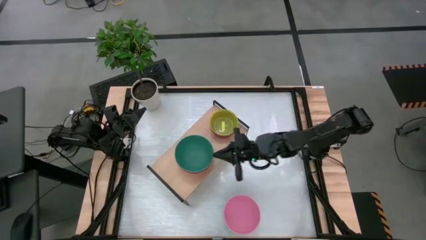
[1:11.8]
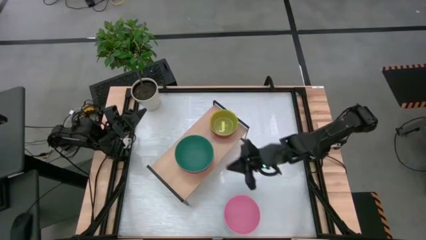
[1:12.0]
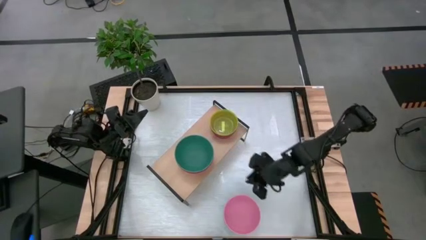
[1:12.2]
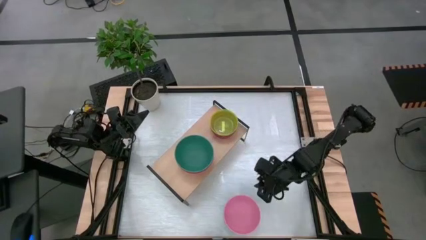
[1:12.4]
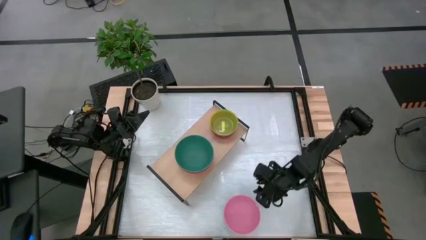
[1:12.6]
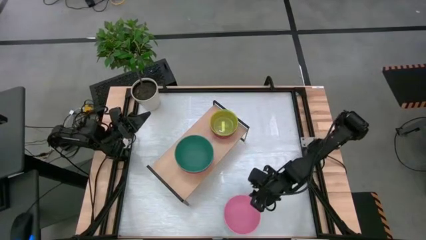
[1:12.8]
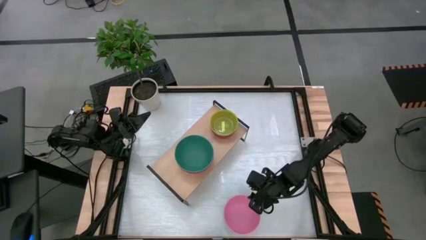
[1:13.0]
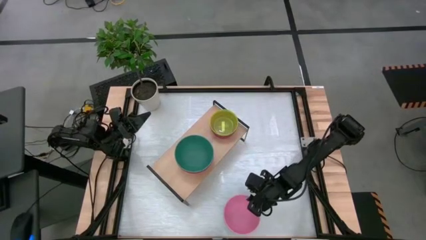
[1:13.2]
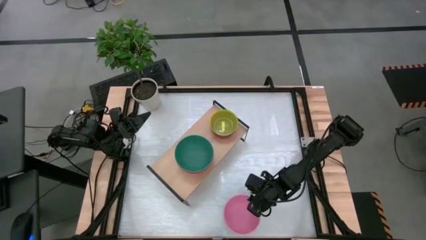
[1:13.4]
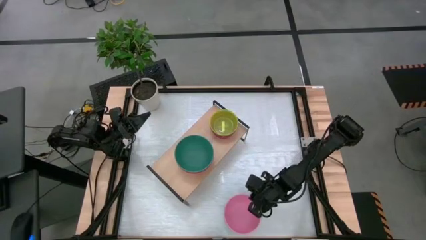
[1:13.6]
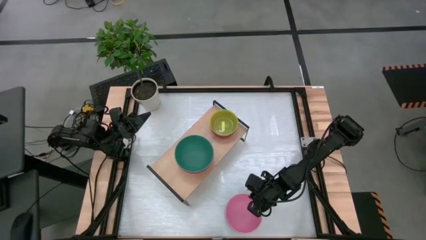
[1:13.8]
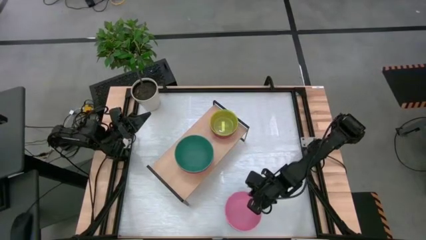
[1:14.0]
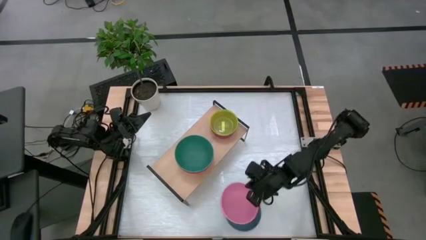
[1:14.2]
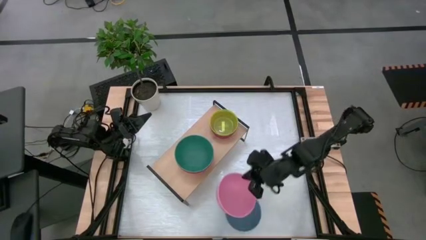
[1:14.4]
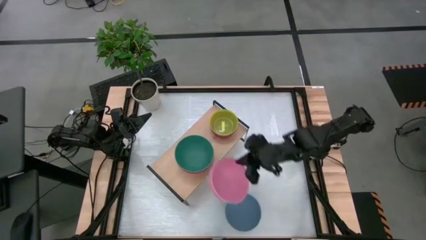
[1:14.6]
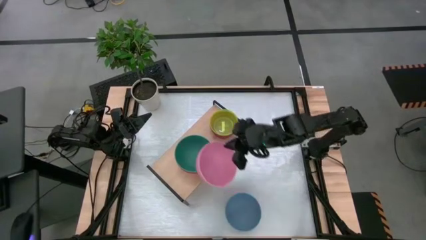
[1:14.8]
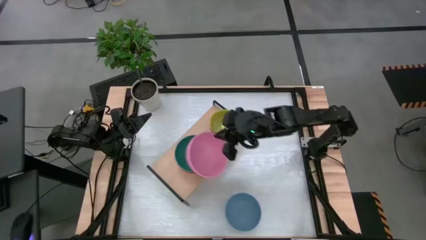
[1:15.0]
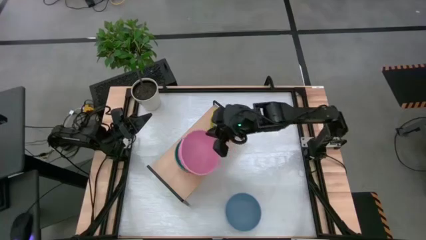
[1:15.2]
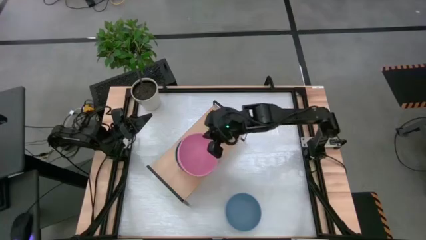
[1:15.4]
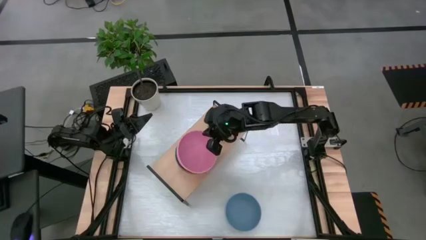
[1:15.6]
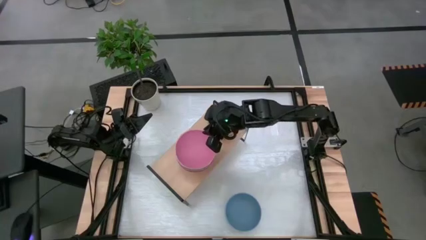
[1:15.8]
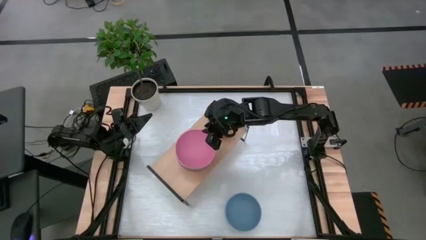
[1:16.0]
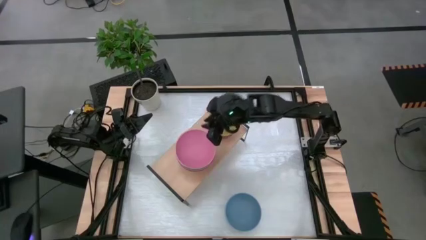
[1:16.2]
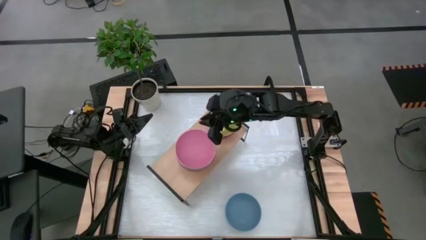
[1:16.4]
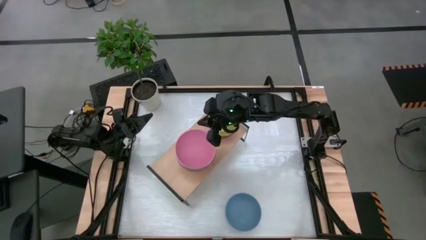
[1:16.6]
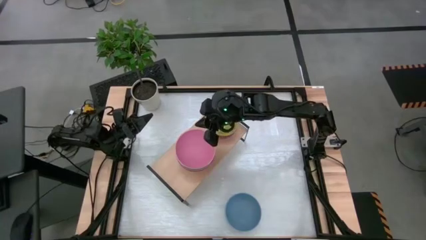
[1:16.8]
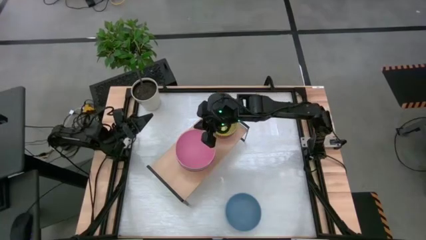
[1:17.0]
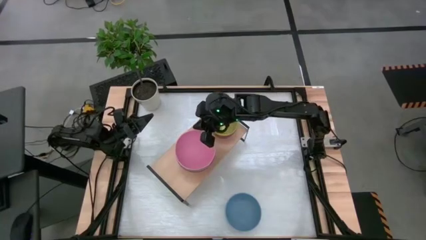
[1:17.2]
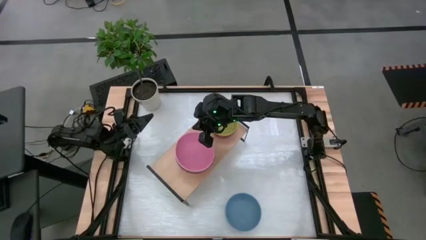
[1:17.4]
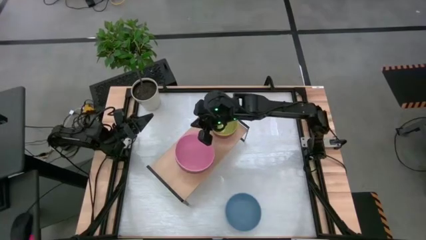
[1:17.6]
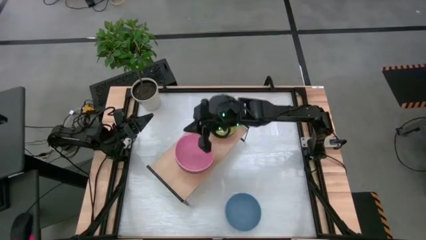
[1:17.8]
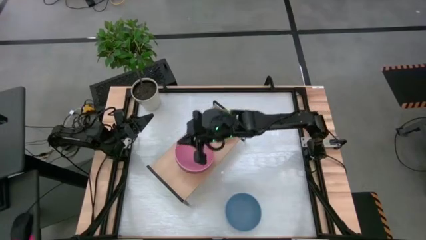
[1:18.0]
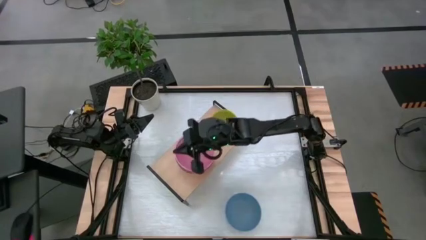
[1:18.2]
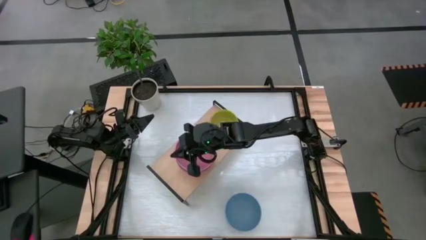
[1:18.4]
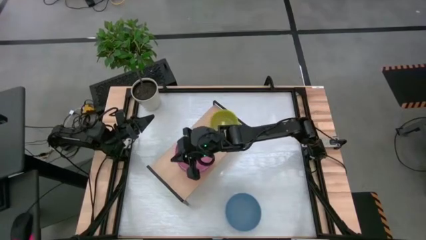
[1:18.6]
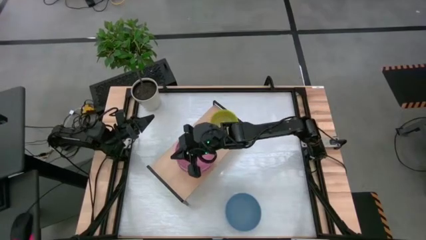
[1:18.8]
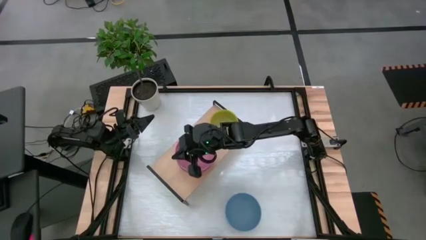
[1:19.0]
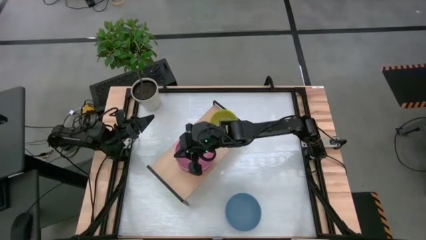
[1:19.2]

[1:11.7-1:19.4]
Task: Place and stack bowls onto a shelf
Stack the pink bowl on top of the green bowl into the shelf

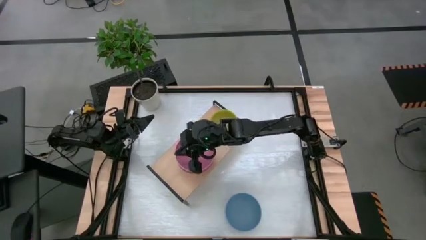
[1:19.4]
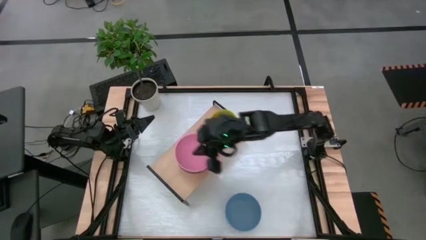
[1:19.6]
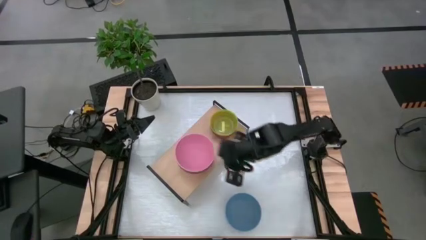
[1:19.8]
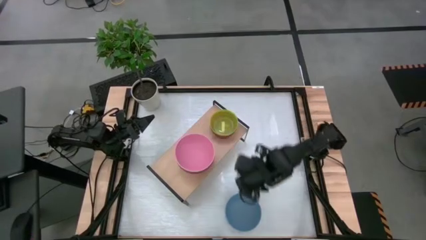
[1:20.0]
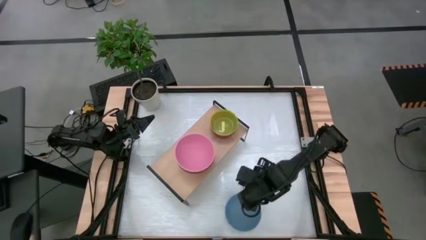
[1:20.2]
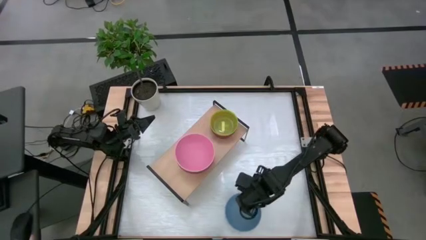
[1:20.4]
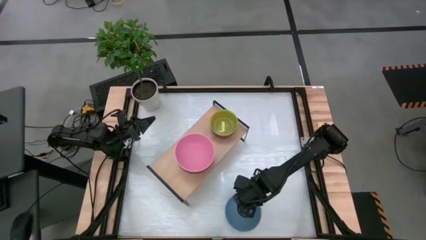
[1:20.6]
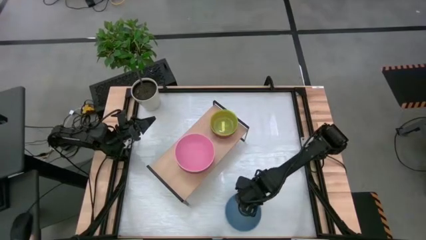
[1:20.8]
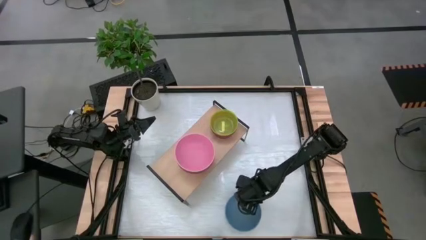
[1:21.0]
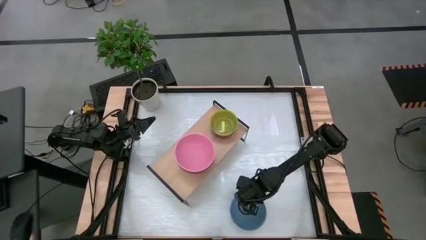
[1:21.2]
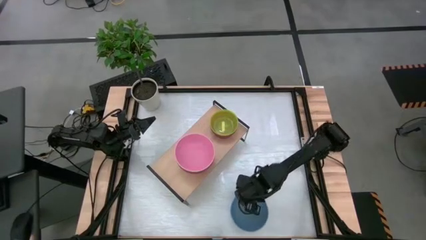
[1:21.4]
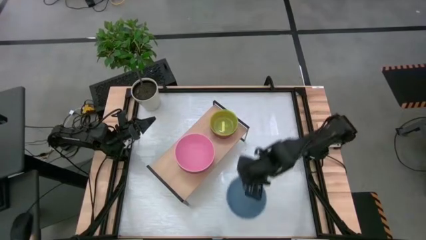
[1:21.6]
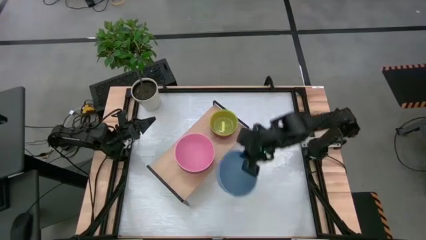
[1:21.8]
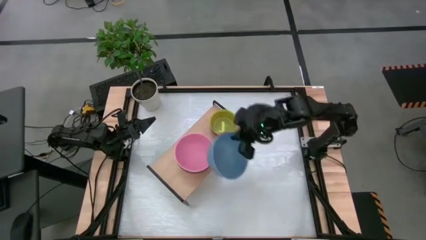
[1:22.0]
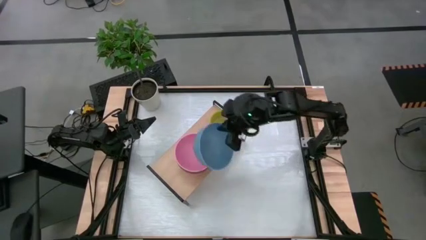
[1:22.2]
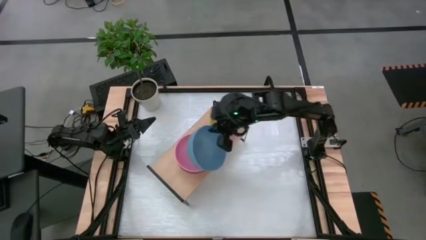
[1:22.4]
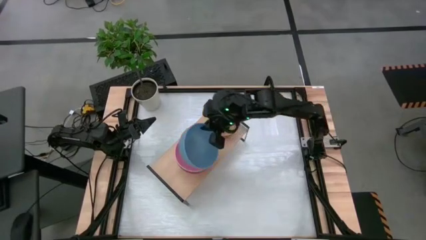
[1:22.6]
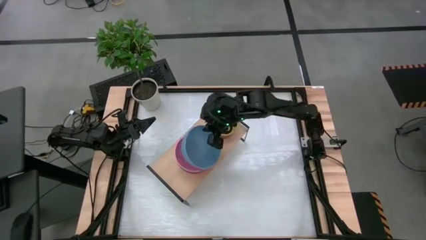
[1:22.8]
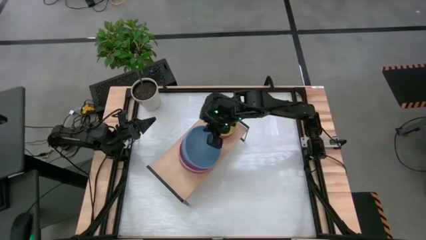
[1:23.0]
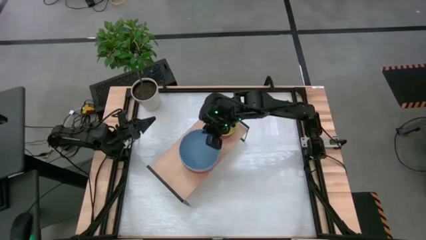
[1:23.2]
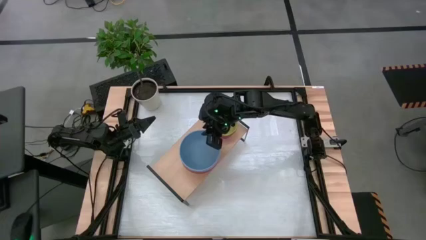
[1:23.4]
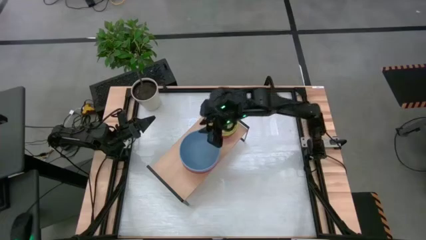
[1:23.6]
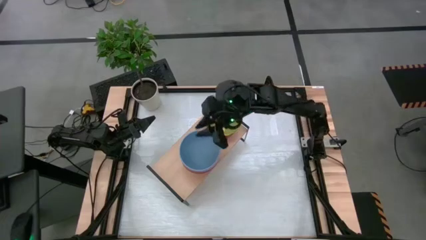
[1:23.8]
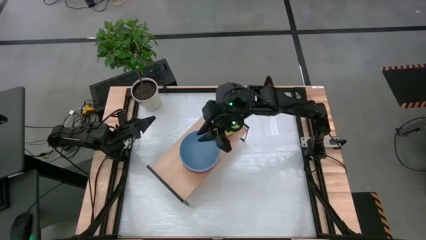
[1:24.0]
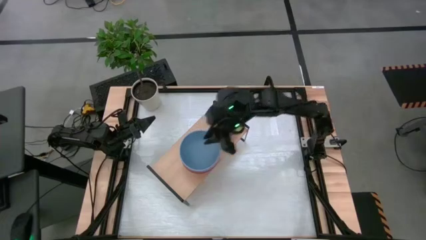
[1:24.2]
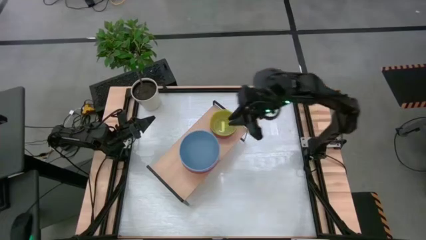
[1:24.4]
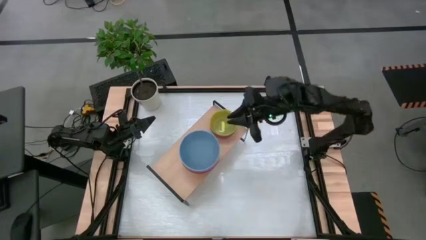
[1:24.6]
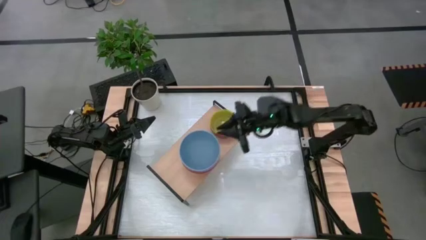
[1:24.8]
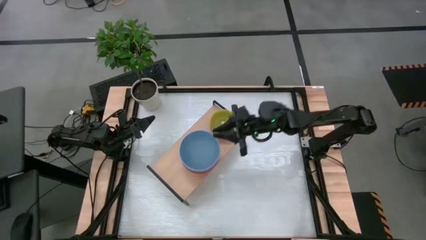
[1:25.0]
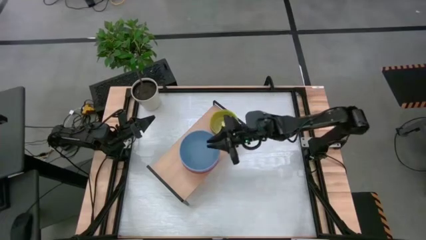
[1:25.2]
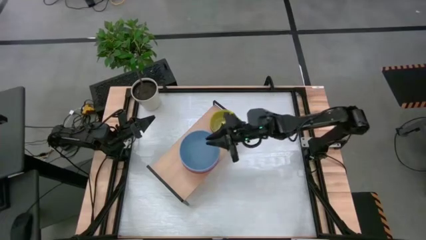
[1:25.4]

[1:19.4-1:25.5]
Stack the blue bowl on top of the pink bowl into the shelf
